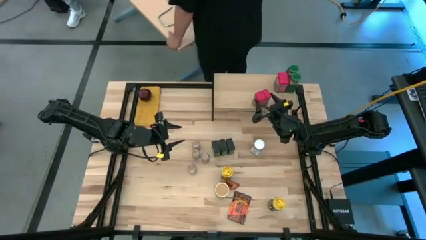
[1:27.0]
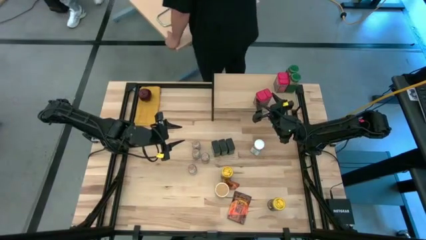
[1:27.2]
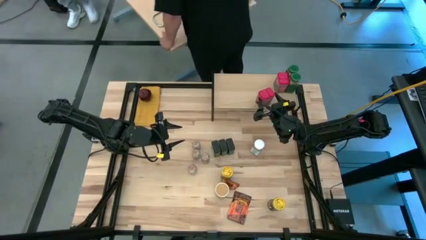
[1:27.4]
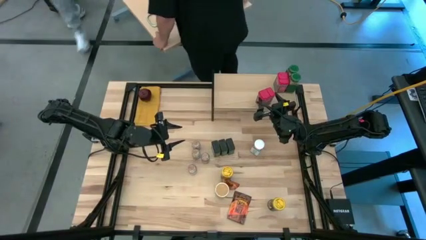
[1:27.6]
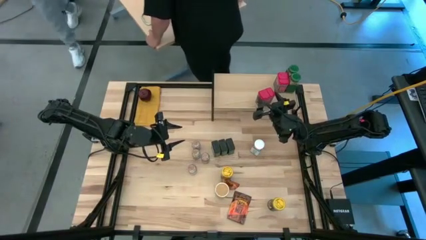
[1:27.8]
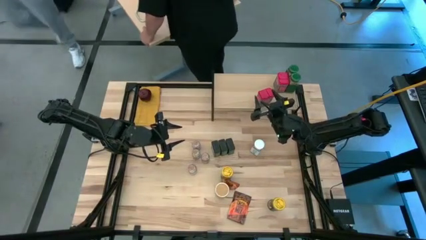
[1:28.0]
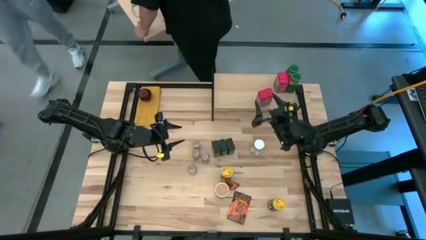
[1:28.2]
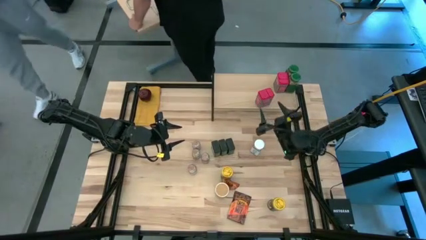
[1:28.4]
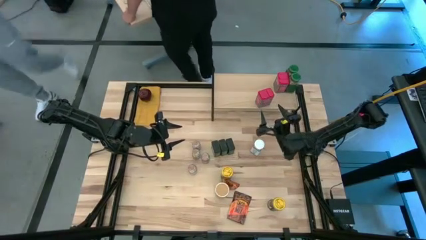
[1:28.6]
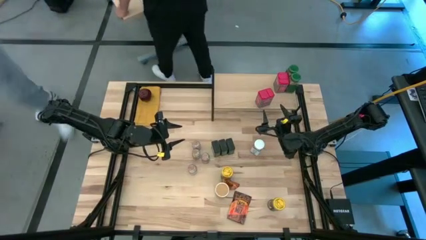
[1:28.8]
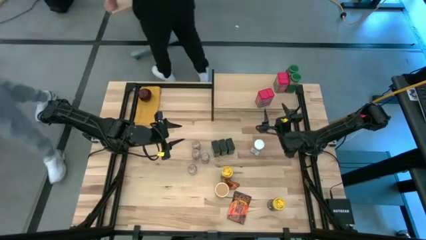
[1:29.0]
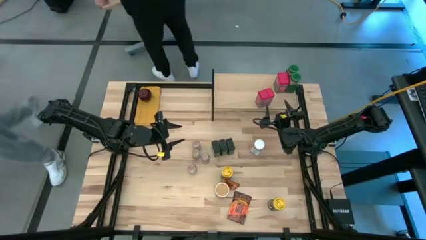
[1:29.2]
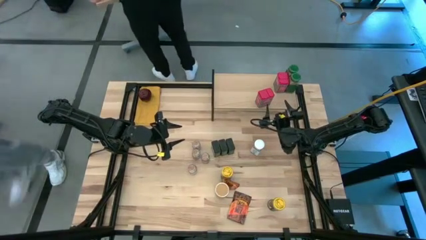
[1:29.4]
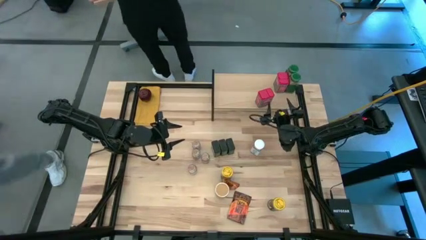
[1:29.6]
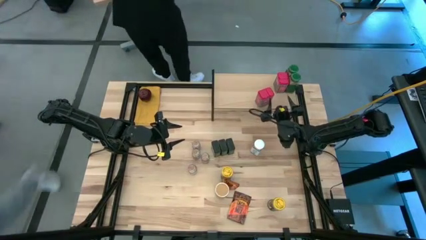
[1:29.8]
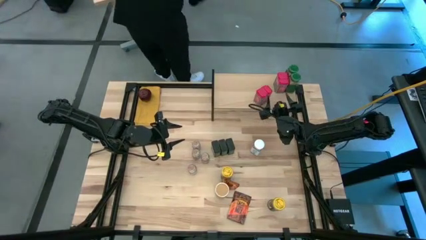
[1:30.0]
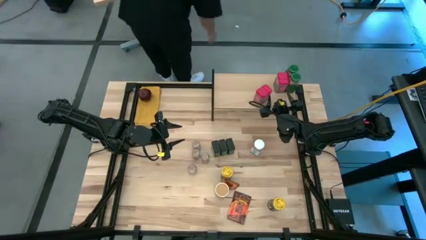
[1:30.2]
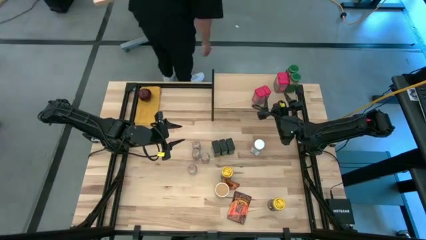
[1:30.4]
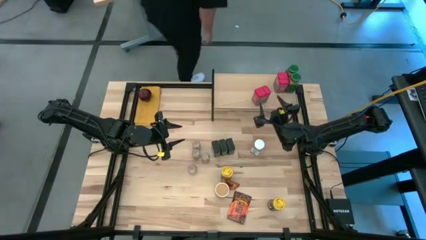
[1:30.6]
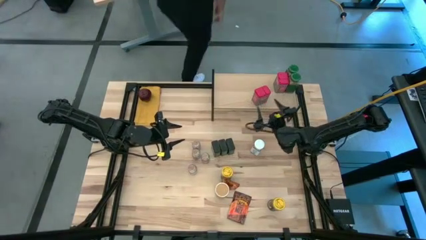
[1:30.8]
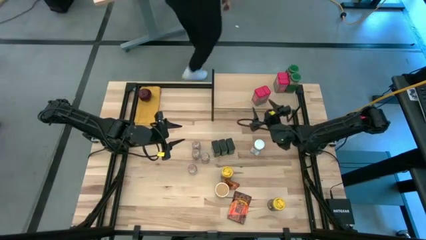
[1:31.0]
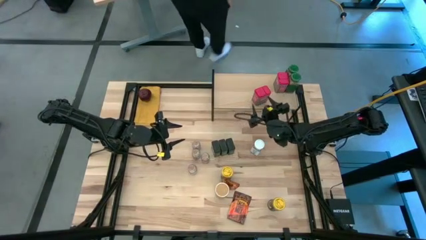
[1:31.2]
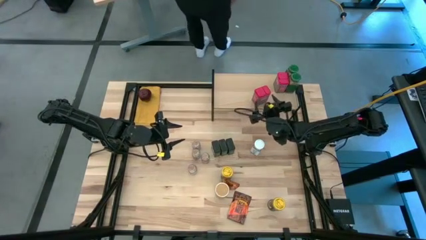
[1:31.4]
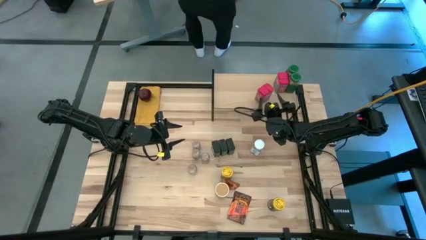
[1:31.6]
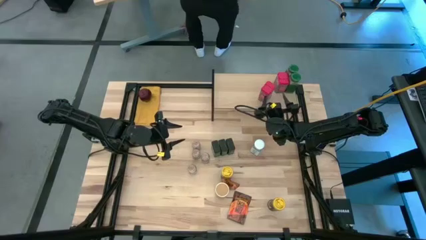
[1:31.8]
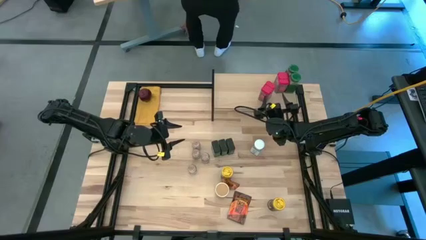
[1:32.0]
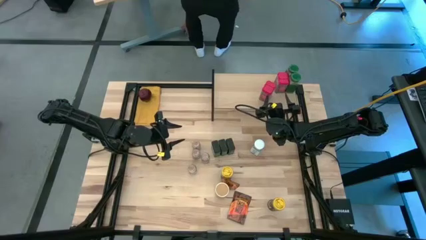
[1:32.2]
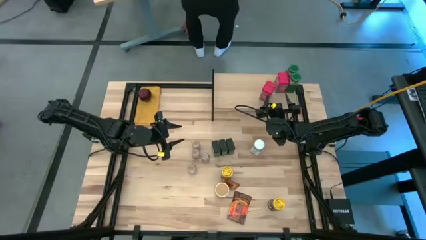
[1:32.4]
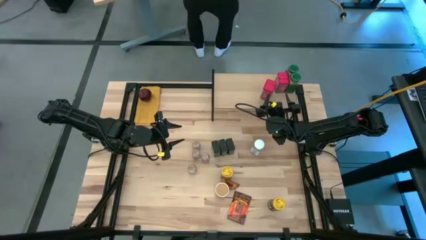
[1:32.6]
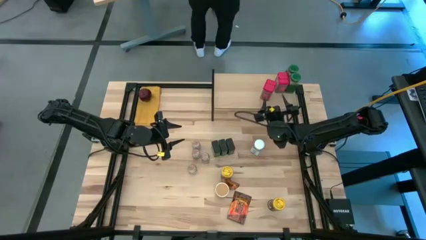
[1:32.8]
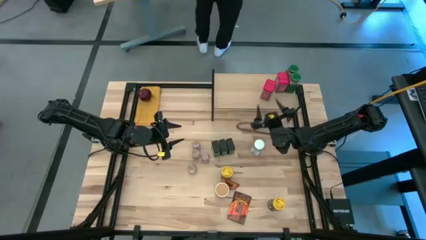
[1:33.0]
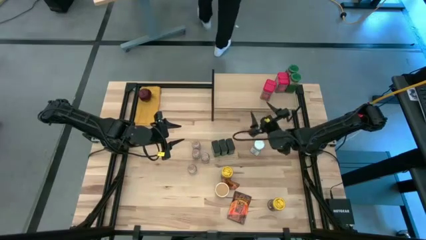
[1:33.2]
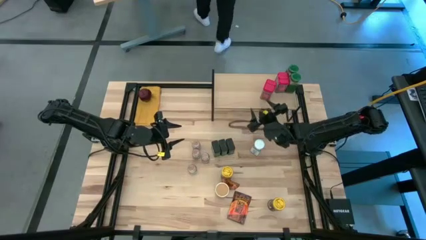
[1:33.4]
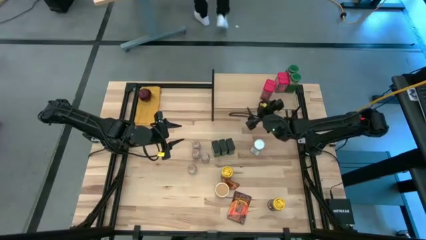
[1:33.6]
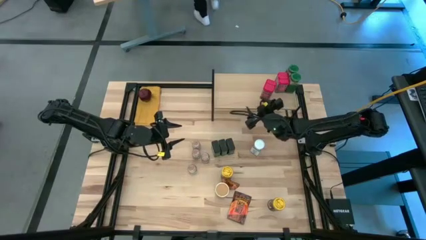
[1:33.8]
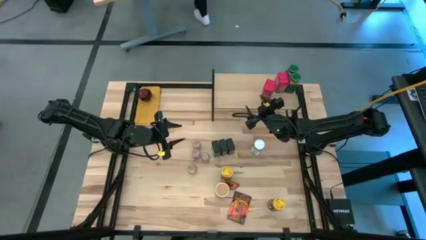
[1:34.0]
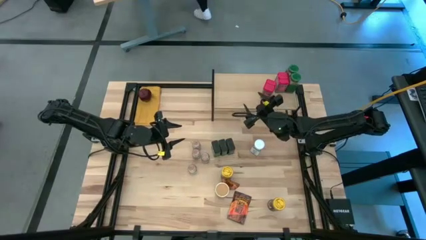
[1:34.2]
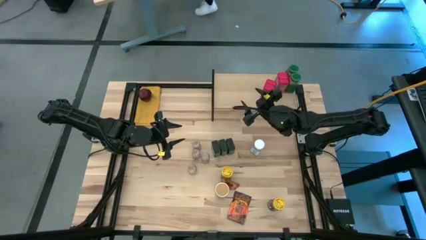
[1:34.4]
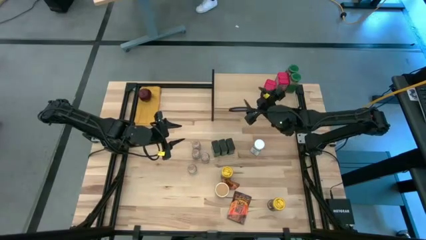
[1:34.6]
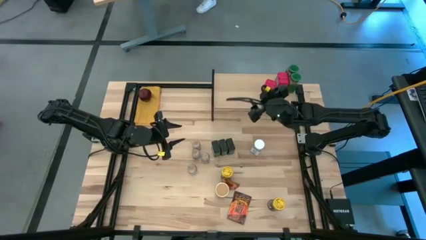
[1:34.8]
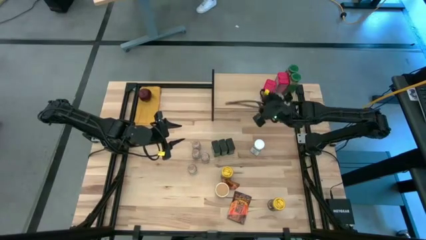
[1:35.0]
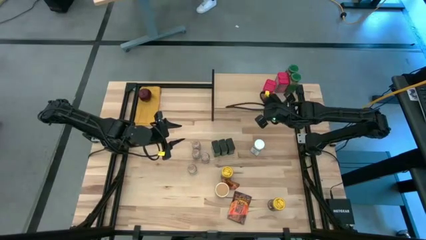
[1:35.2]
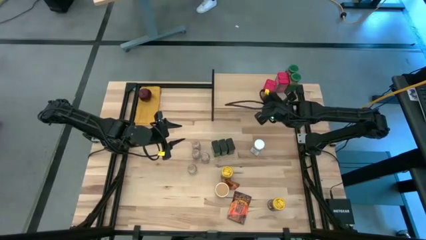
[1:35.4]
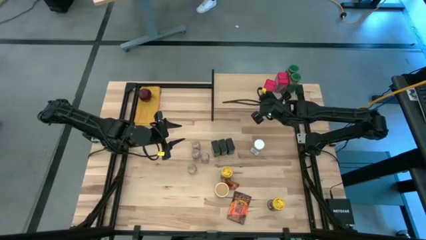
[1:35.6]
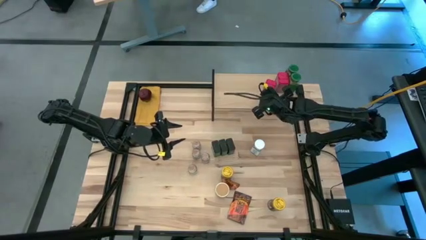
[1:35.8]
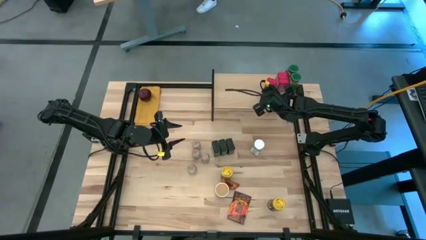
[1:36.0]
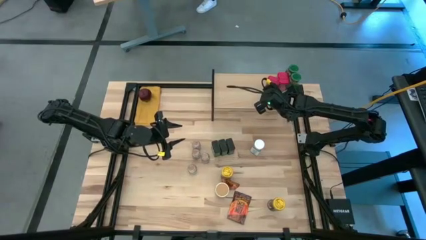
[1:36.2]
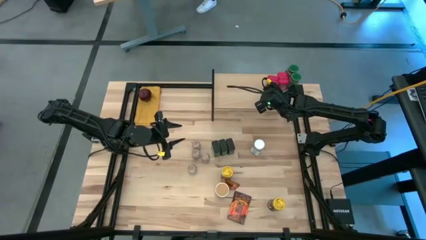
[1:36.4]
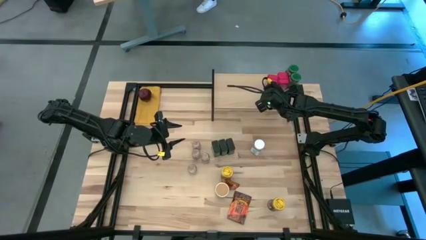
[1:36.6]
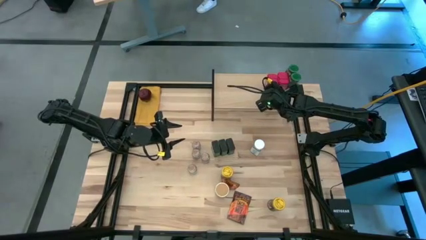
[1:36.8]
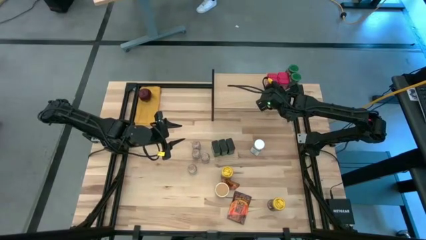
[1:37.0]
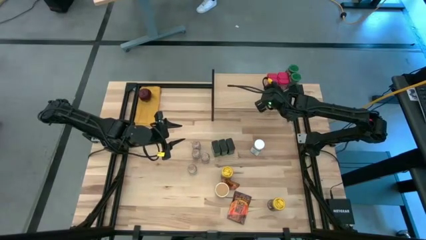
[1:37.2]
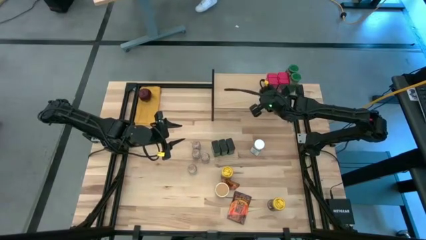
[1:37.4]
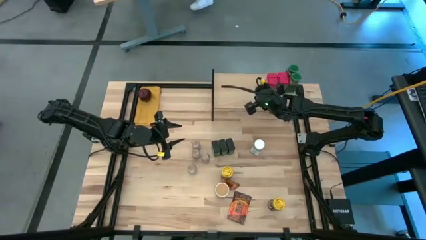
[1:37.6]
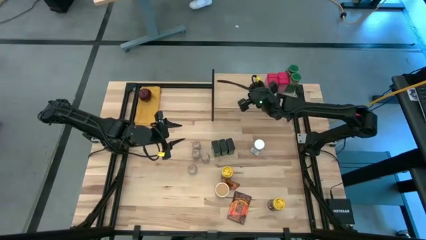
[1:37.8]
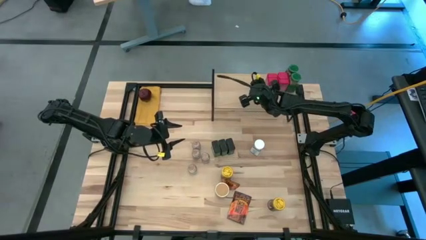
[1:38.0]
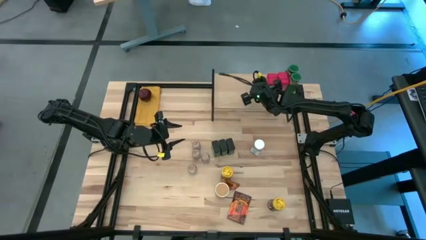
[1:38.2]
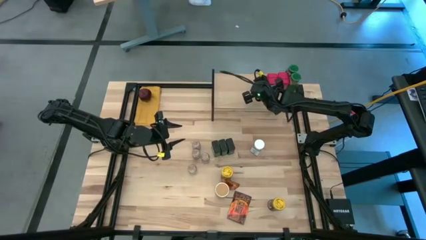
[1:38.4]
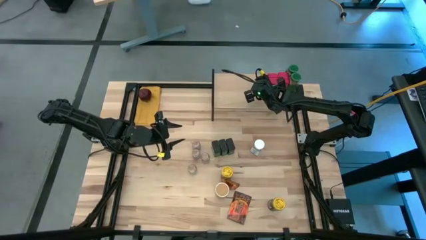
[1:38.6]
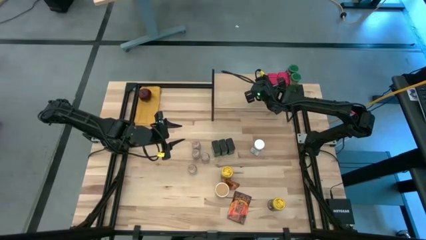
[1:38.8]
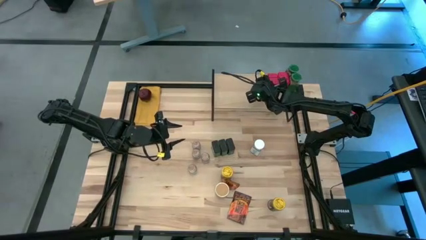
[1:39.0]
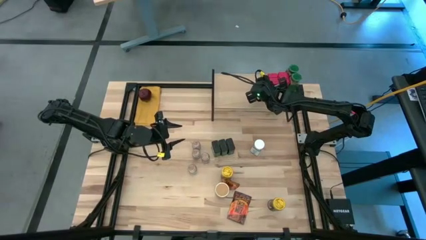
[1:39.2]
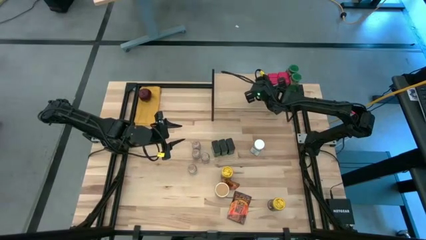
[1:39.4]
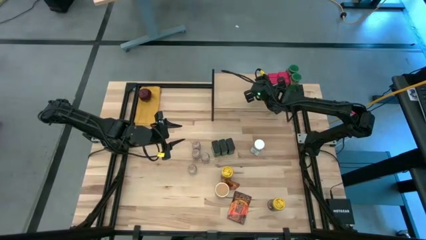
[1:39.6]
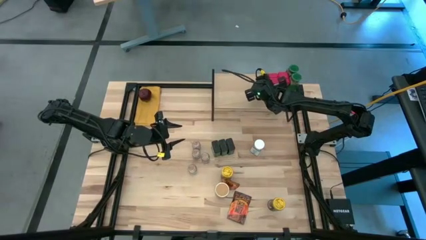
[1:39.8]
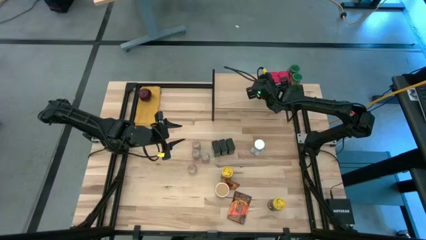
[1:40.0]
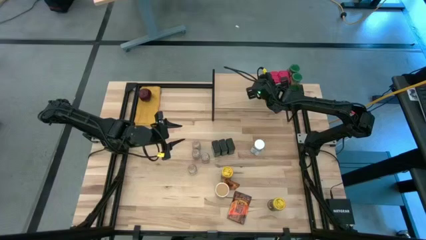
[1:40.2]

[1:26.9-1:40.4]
Task: Shelf spices
Put the red seasoning can on the shelf and align it with the other red seasoning can
